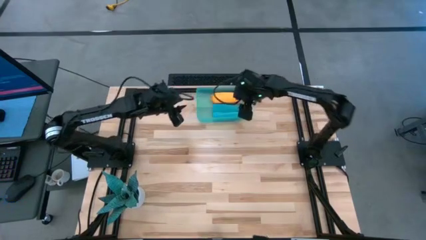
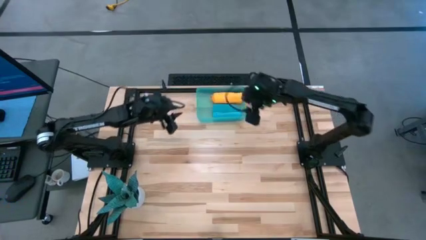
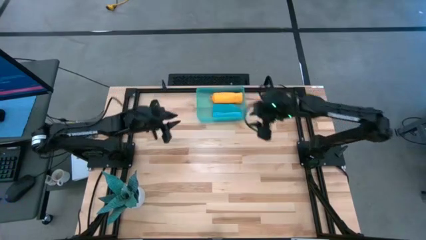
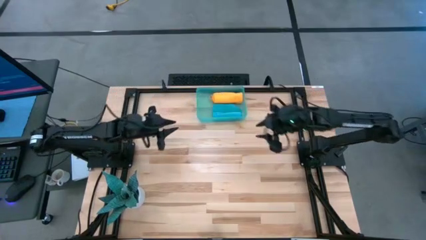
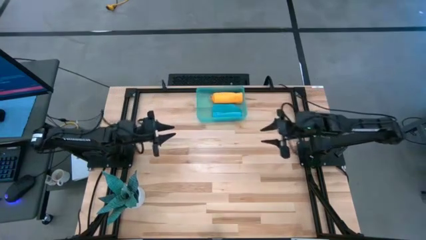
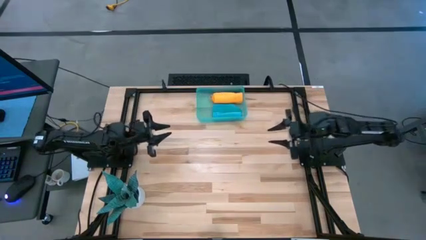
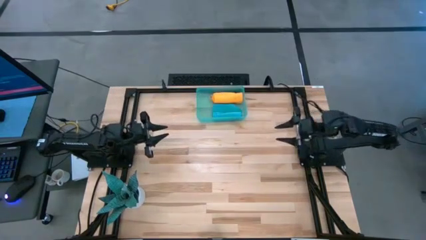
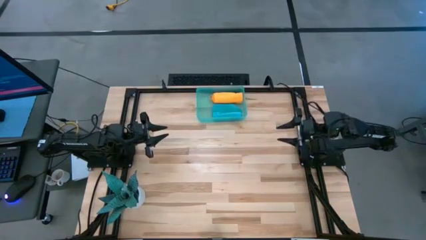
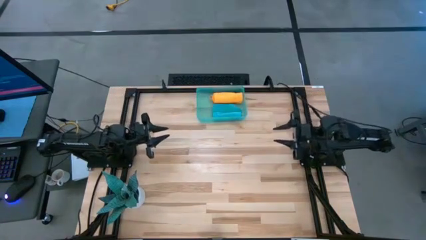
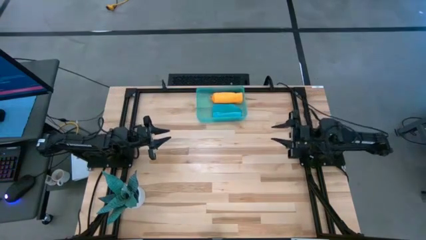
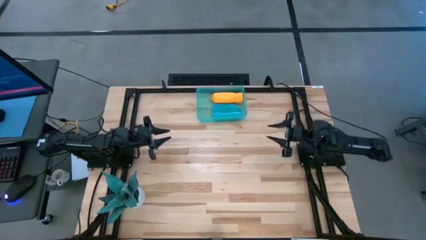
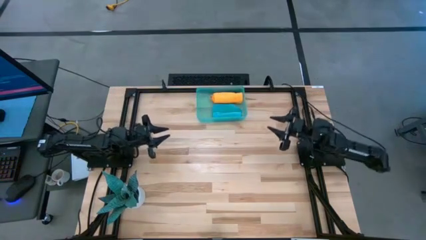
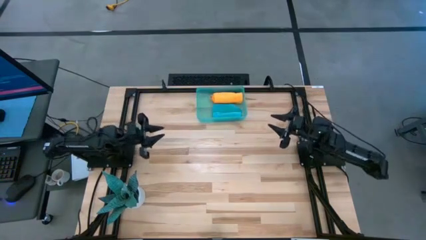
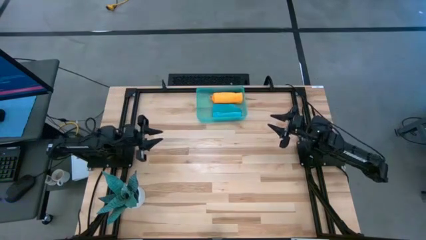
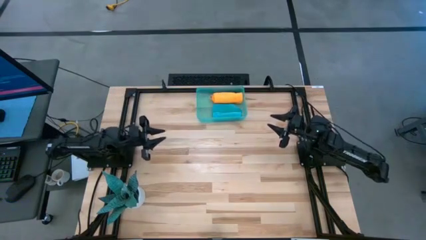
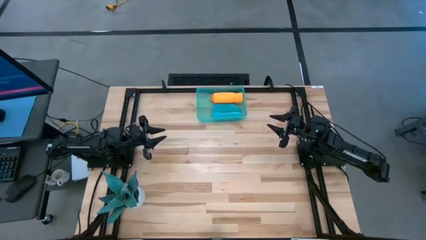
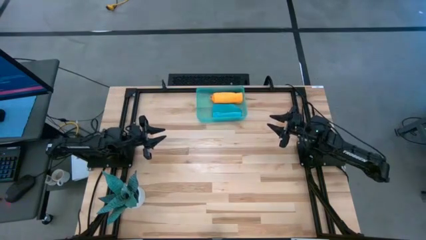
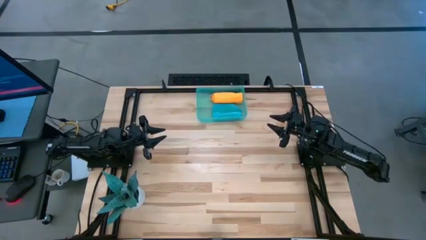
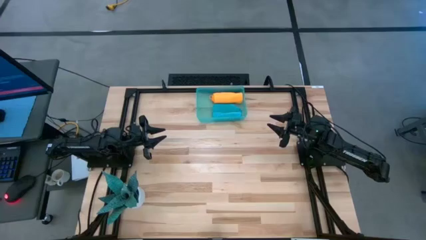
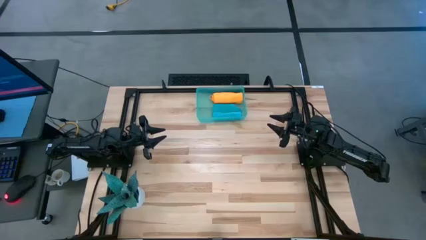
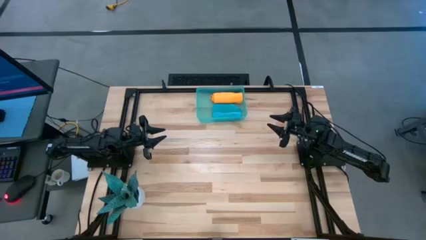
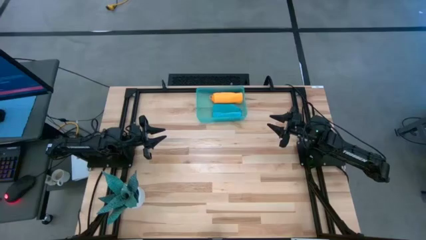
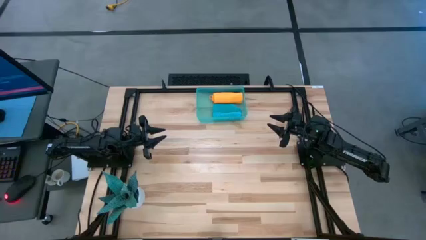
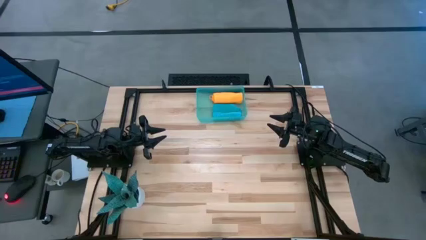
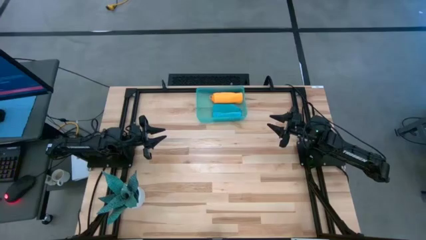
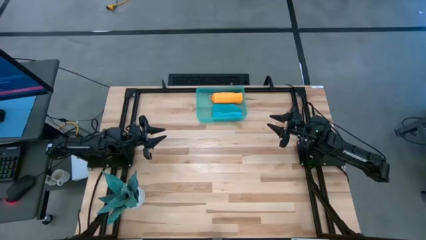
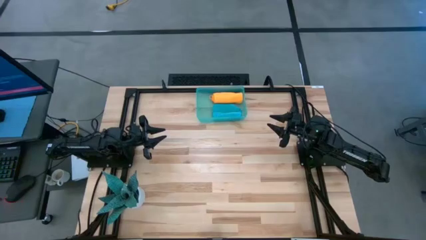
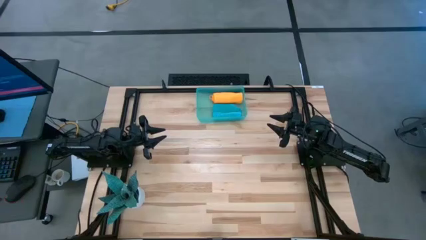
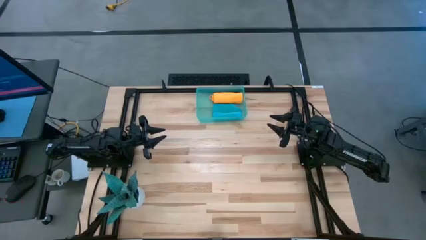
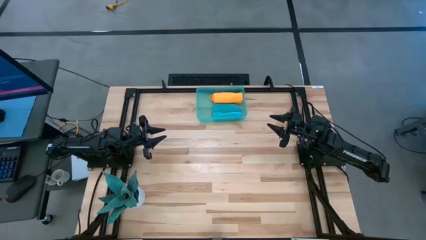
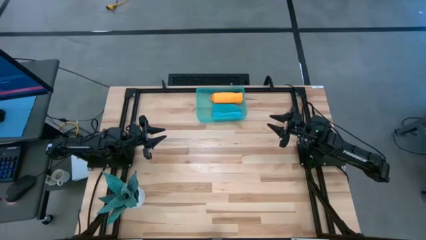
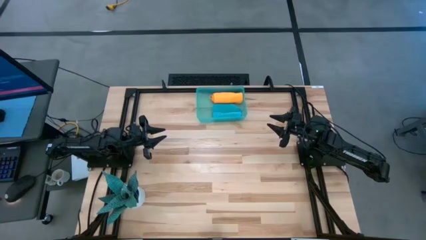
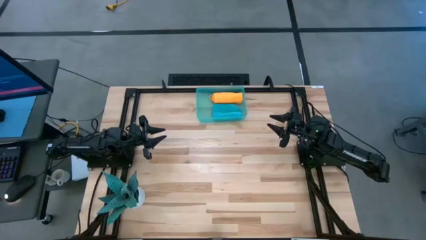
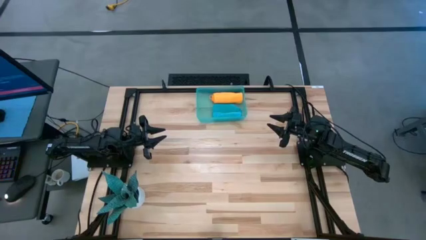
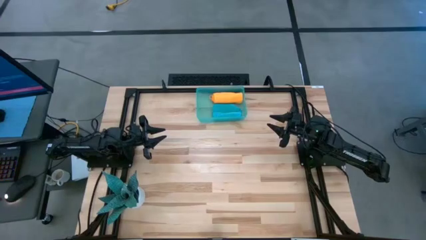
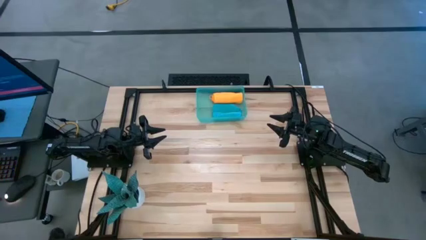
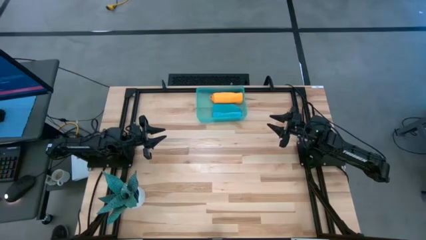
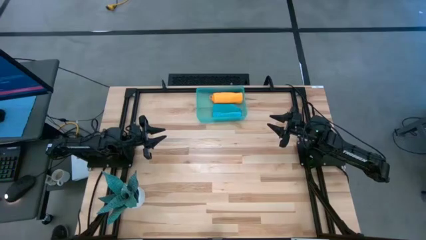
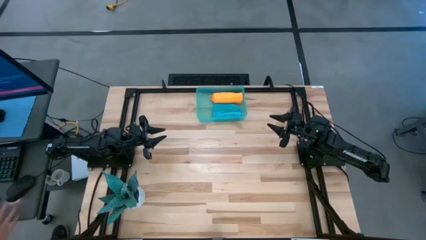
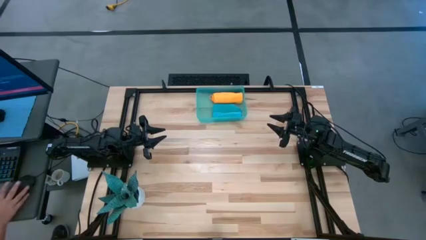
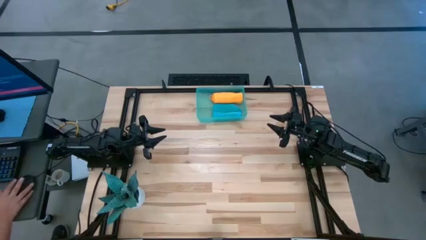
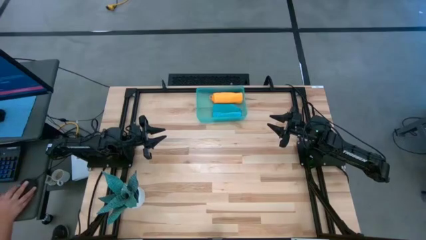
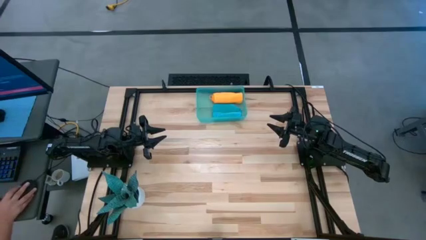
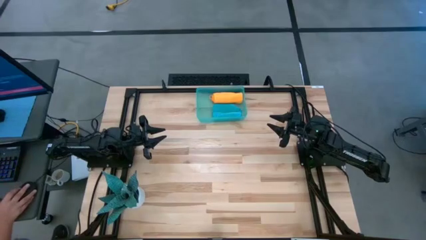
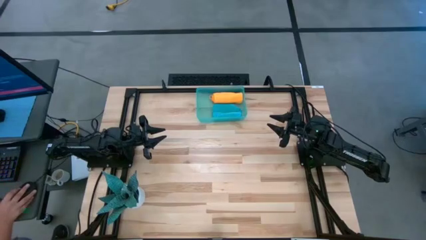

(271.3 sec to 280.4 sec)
Task: Roll microfiber towels into tight, uniform cylinder then place into a basket
Return to Home Position

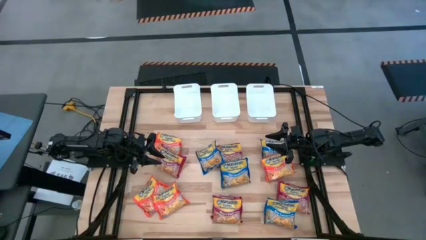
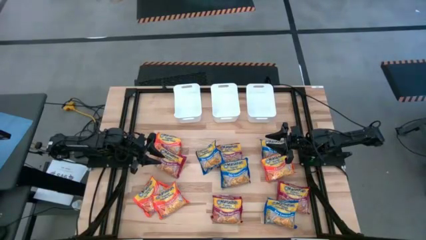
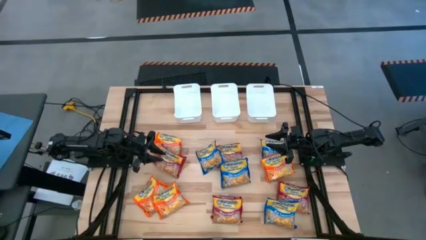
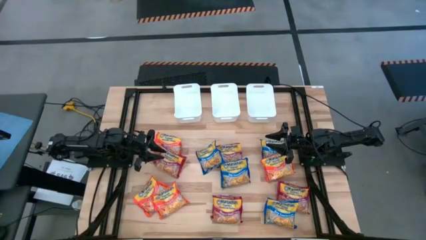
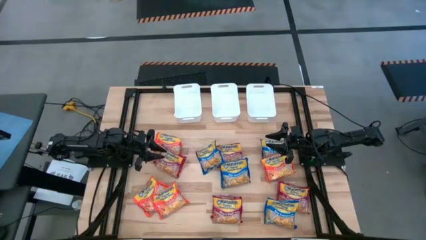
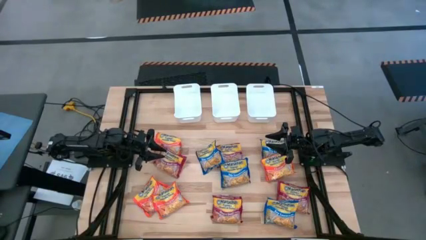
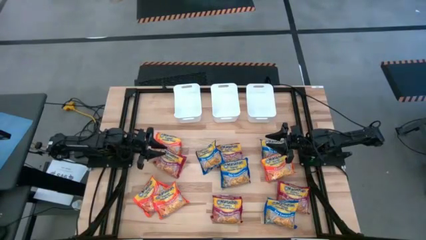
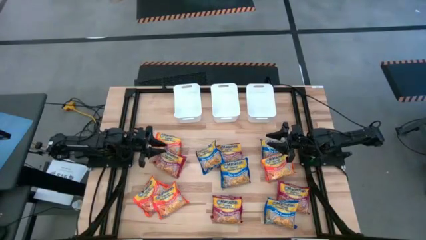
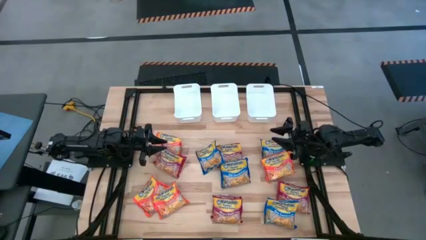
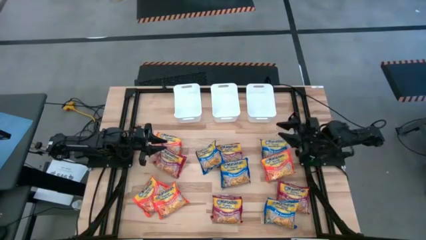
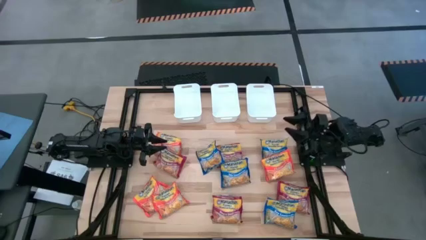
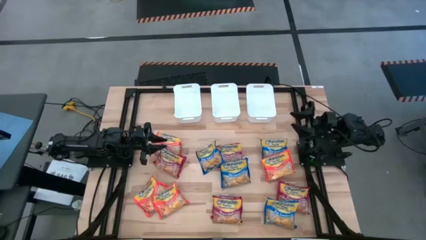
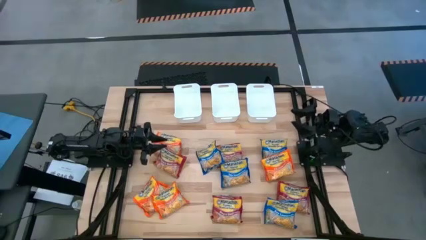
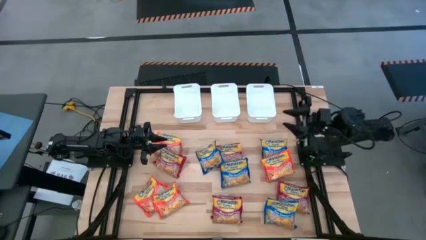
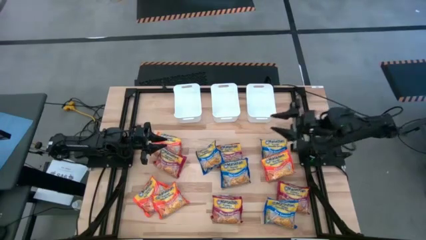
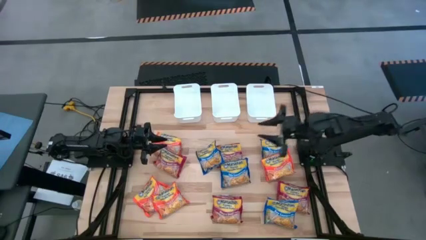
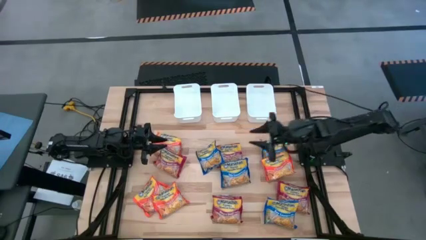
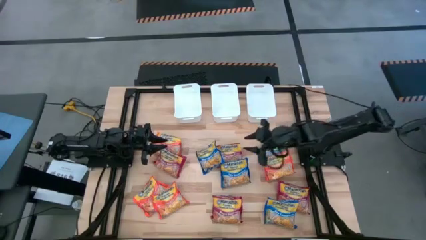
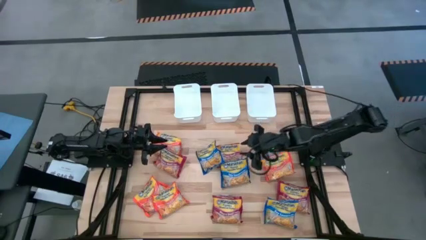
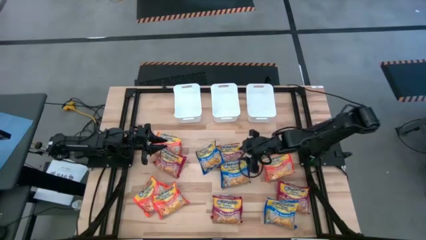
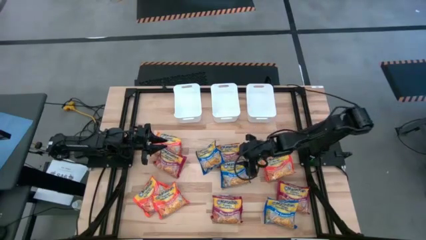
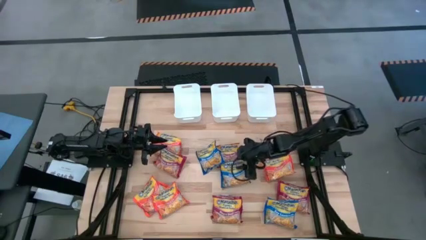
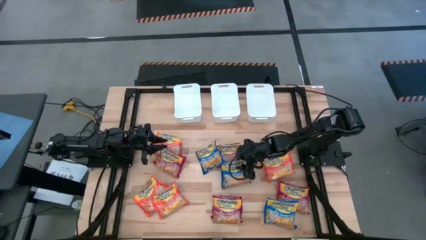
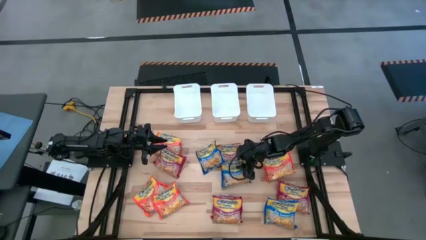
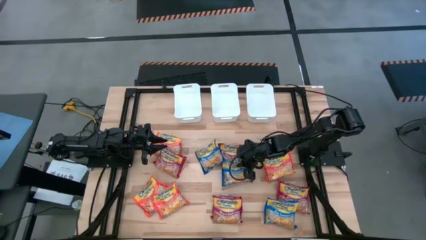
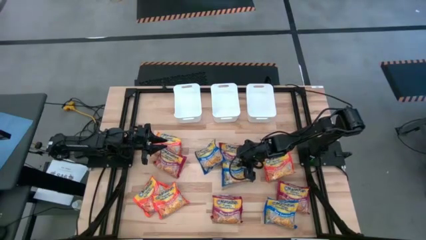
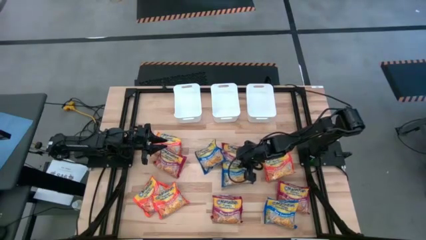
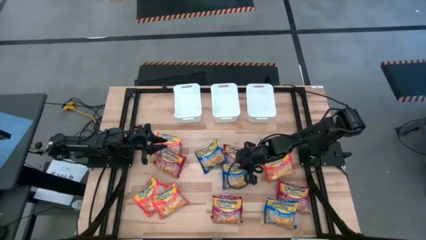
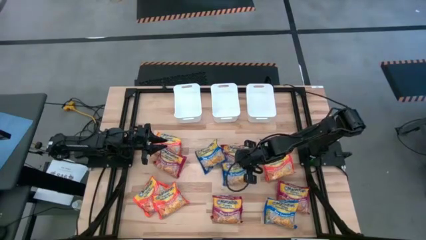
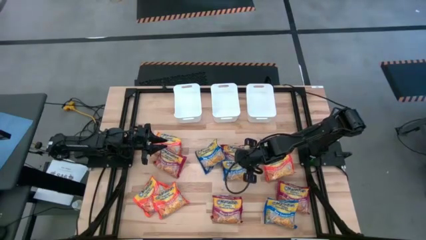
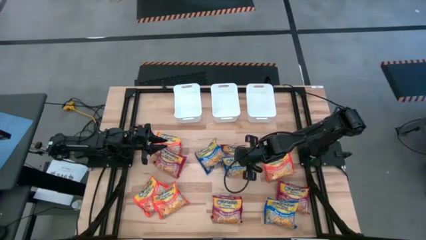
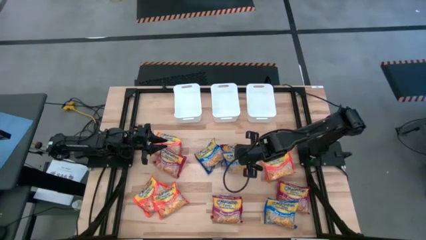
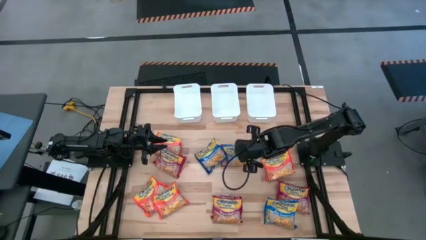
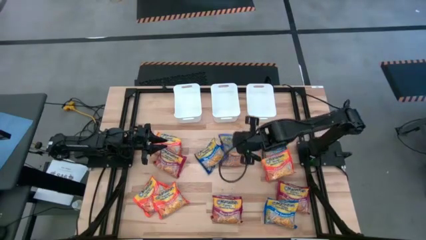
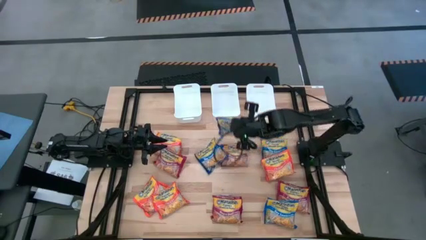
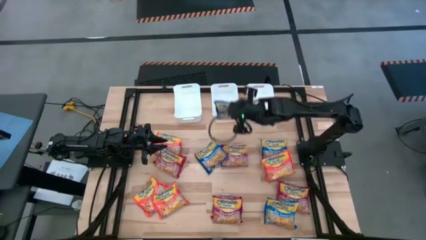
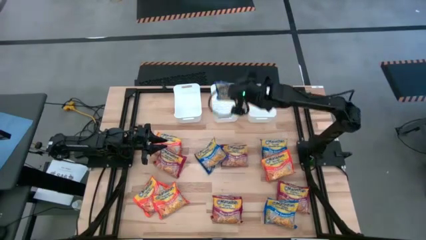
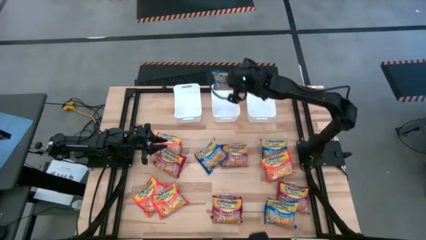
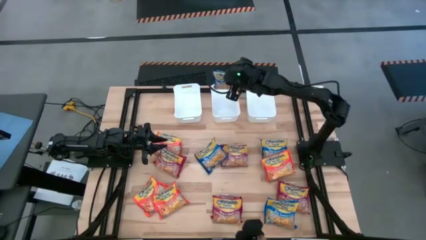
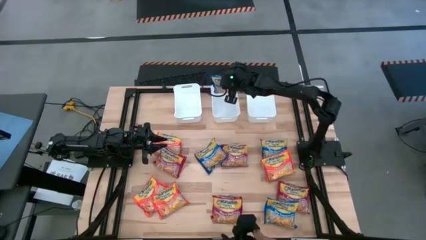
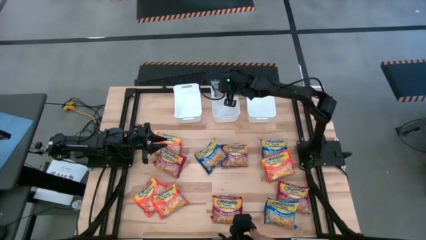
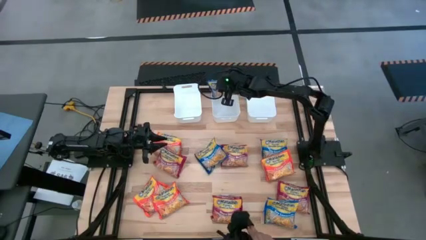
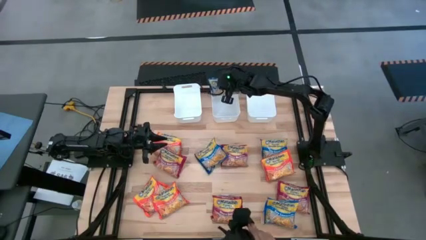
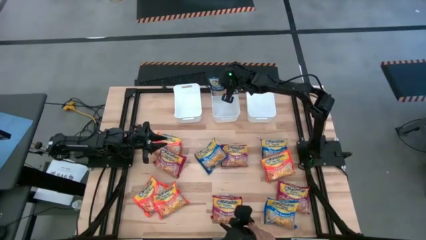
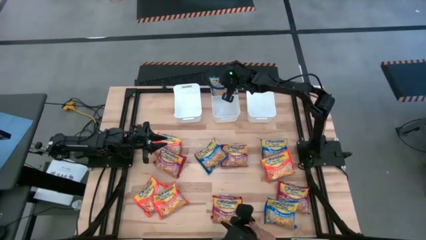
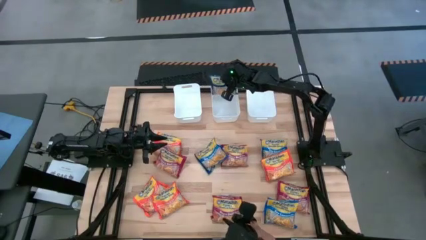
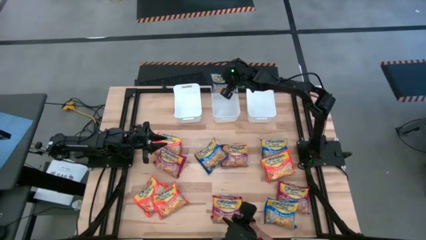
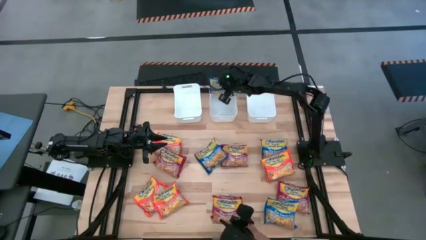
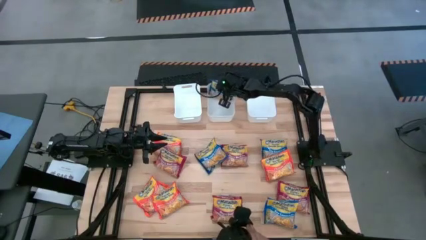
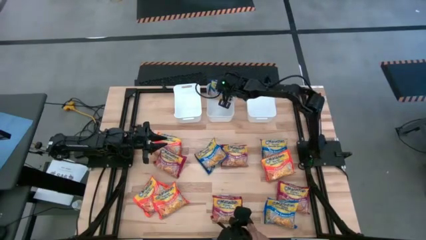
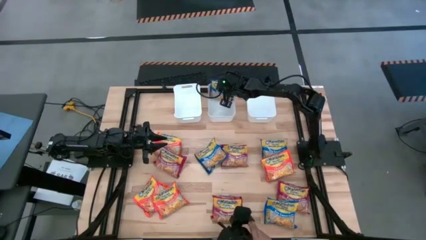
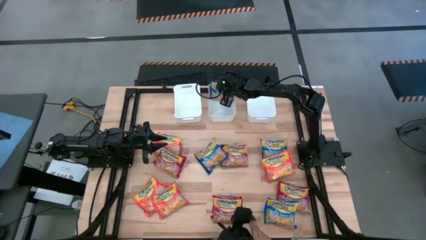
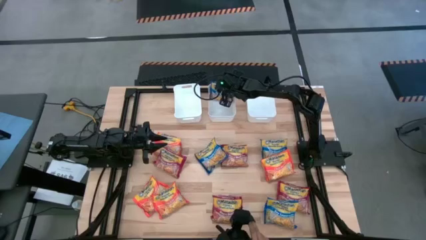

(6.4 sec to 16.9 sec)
Task: Sort Maruchan noodles
Put the blue noodle pack into the middle white bin
